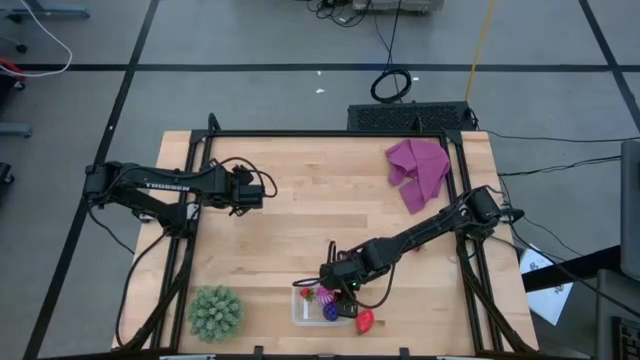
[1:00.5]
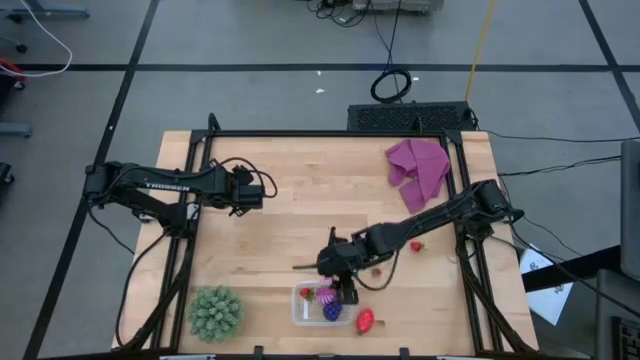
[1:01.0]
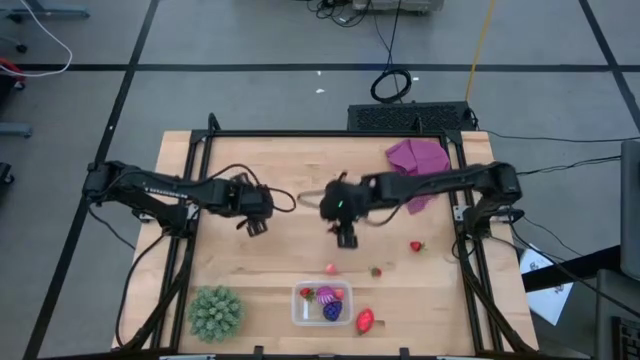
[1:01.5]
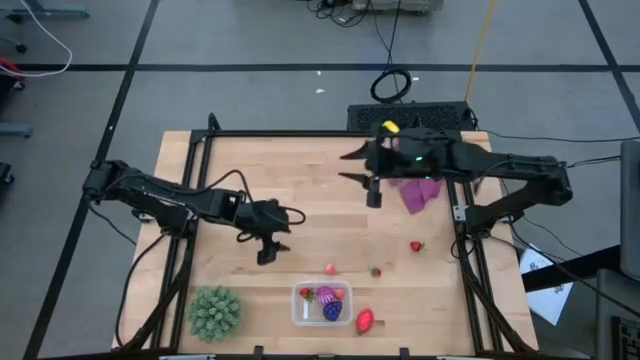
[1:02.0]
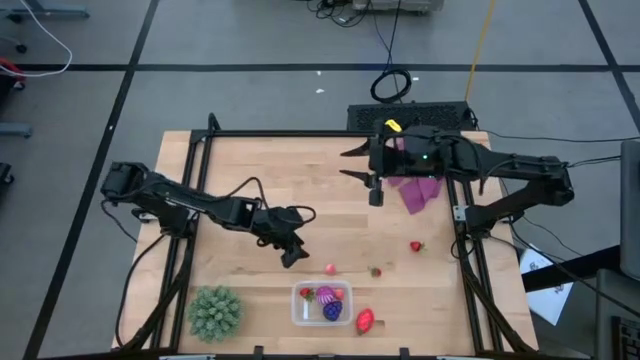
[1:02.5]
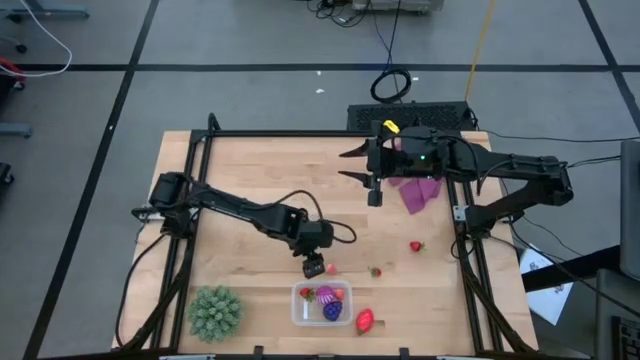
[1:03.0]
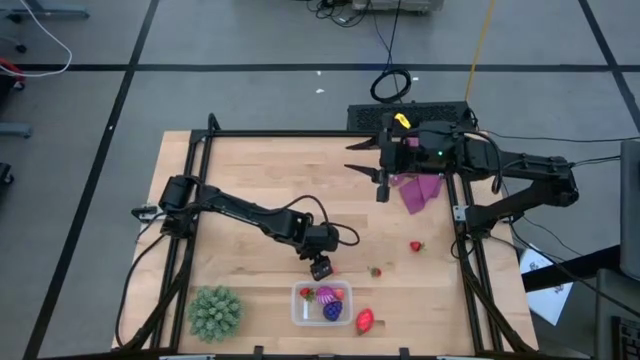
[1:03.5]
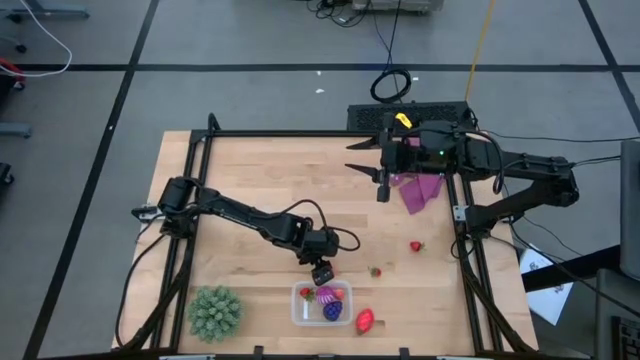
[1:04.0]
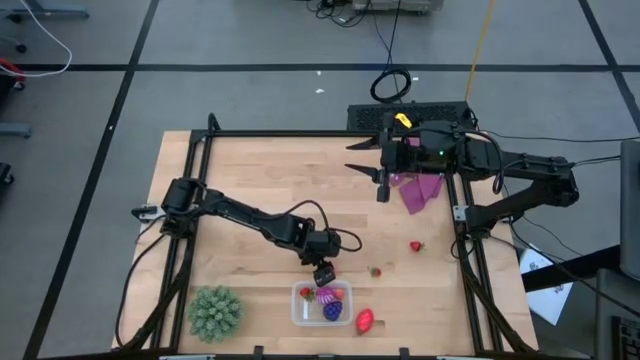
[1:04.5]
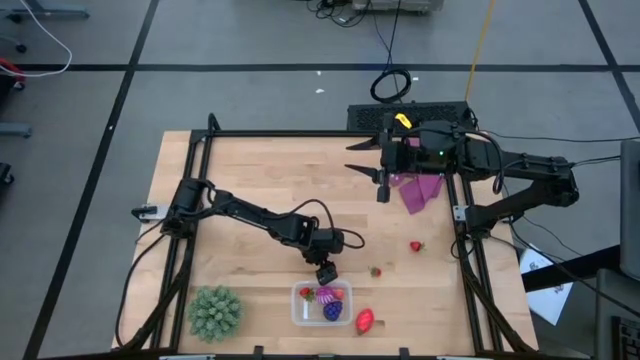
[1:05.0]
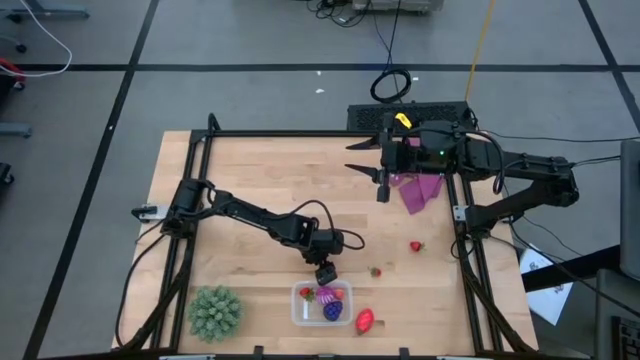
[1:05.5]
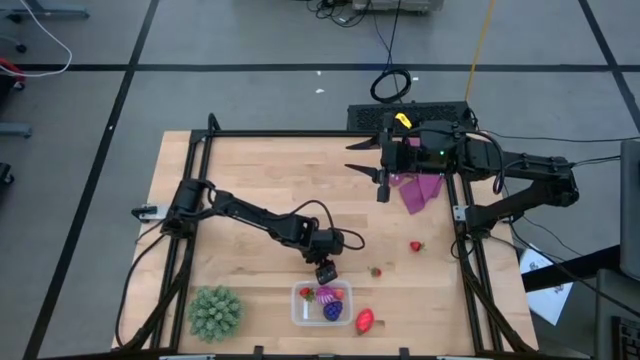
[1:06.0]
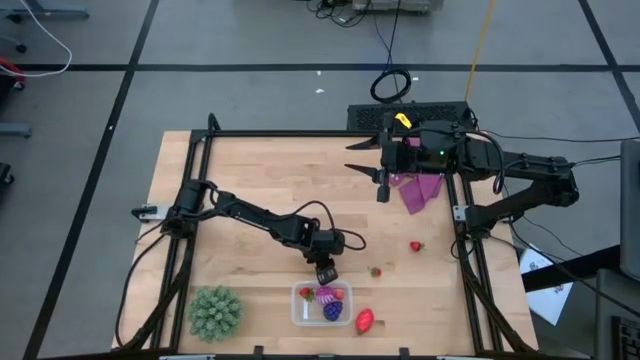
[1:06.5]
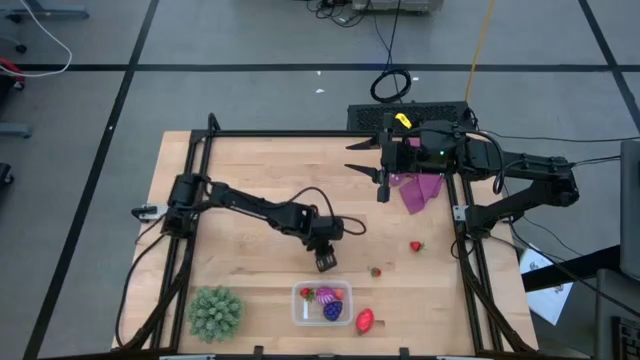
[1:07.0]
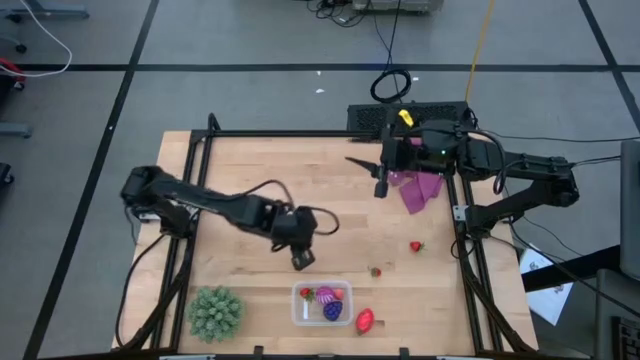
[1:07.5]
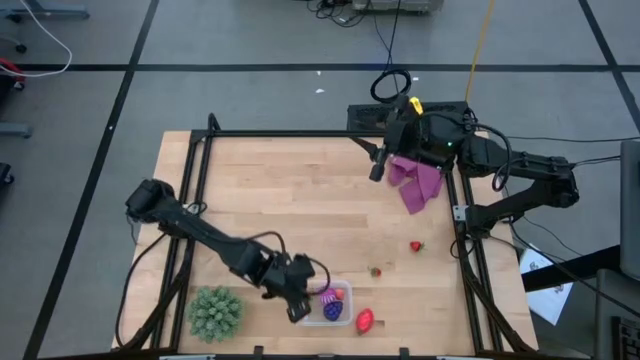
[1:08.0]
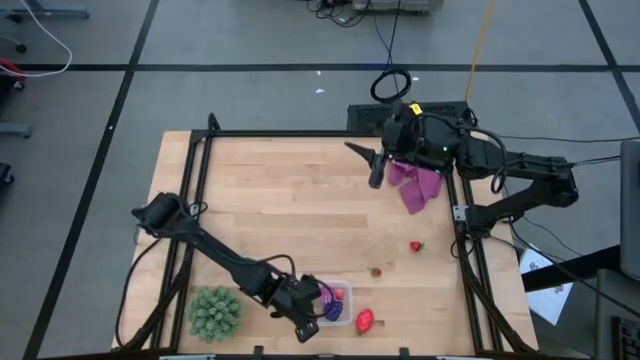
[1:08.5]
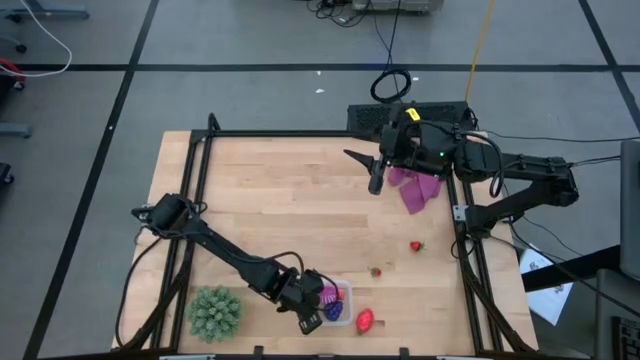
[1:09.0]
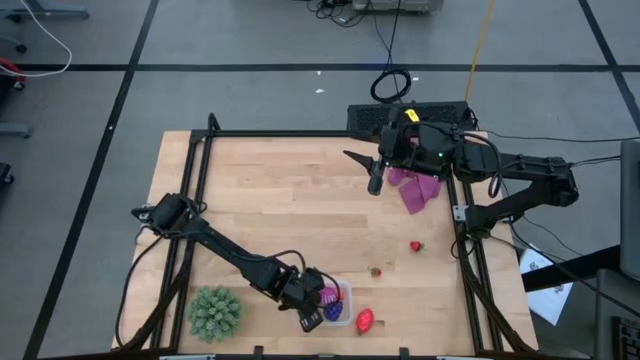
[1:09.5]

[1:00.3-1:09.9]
Task: Pick and placing Produce into tupperware
Put the peach into the transparent bin

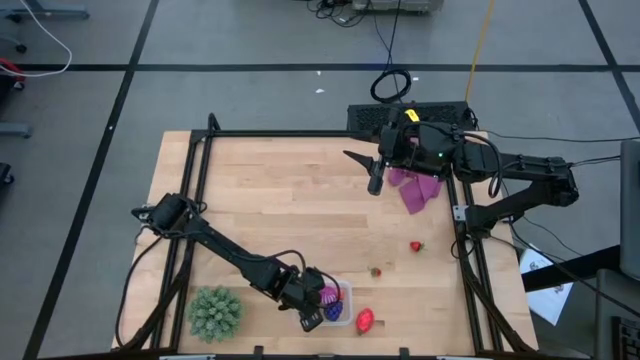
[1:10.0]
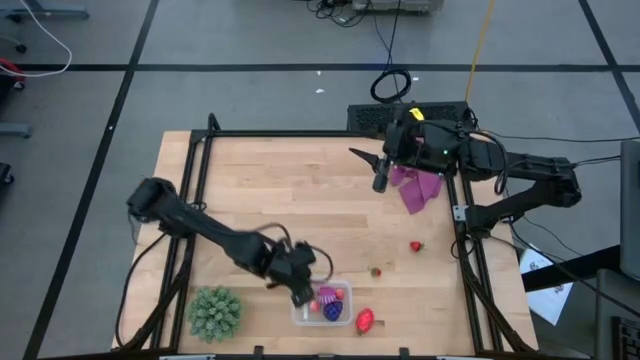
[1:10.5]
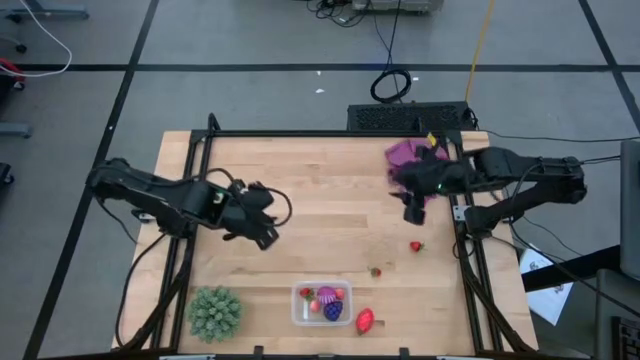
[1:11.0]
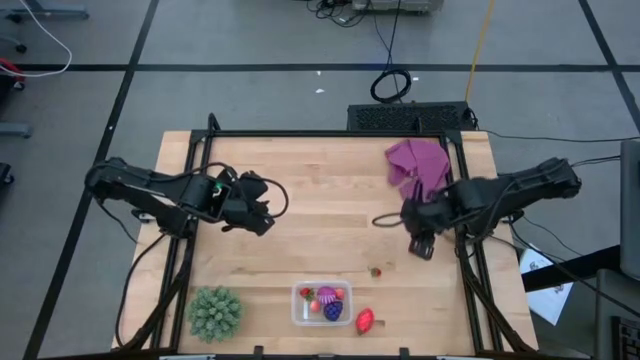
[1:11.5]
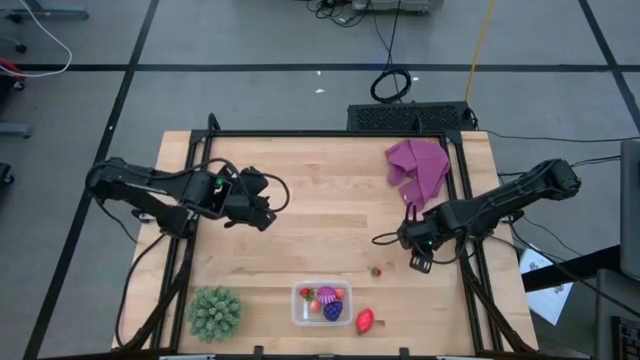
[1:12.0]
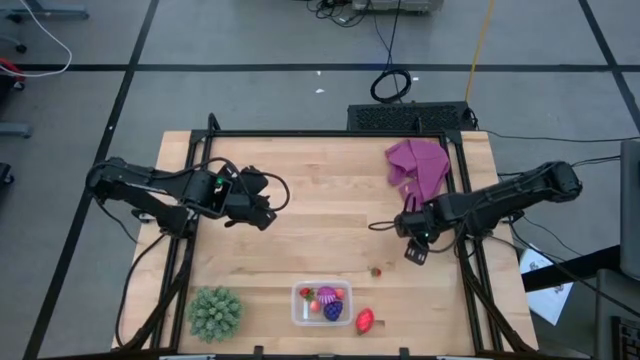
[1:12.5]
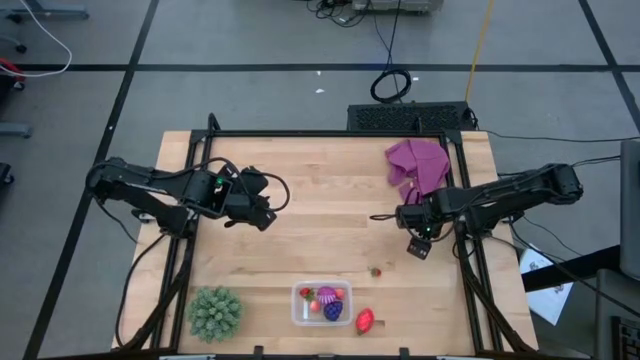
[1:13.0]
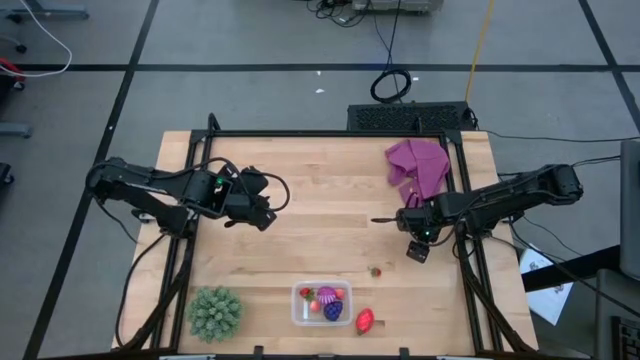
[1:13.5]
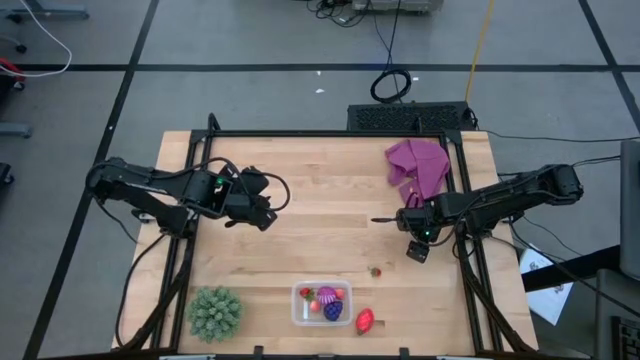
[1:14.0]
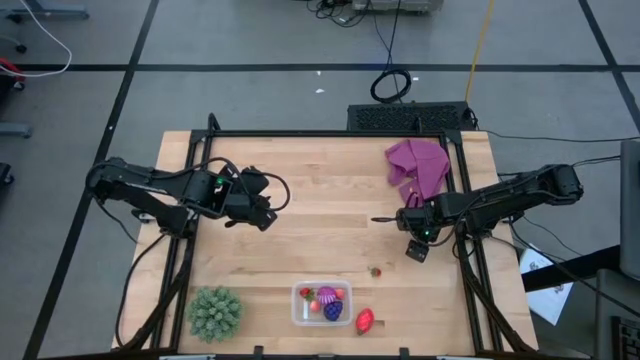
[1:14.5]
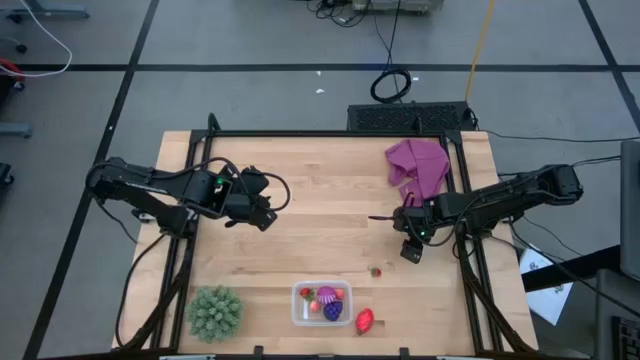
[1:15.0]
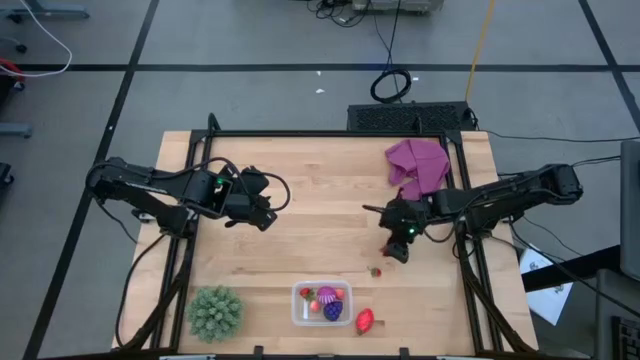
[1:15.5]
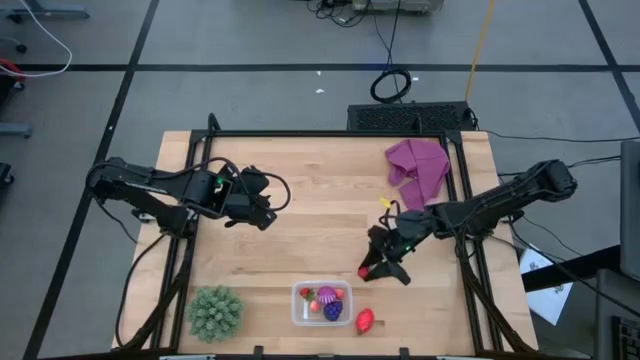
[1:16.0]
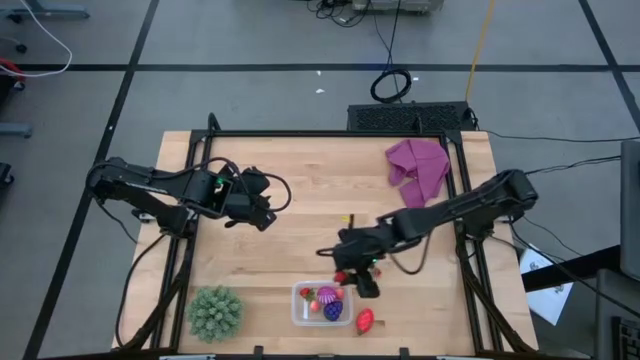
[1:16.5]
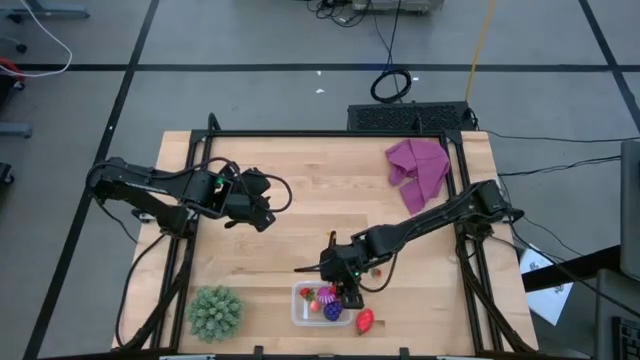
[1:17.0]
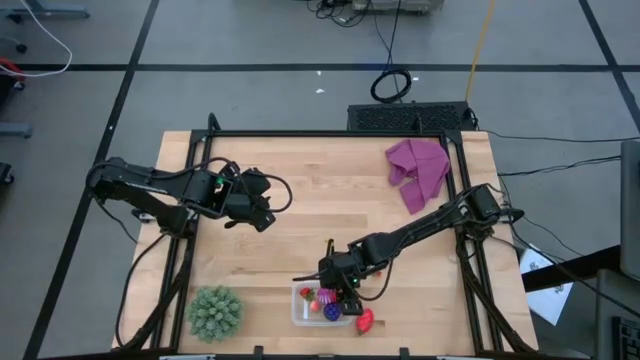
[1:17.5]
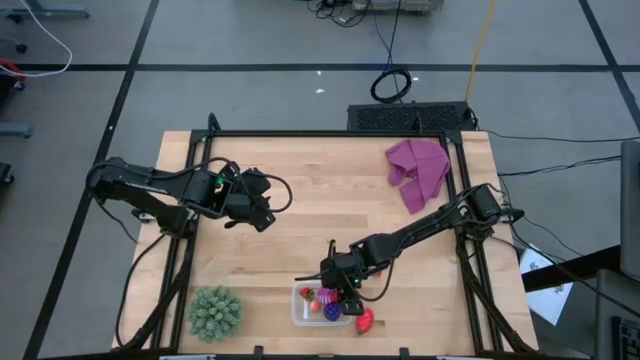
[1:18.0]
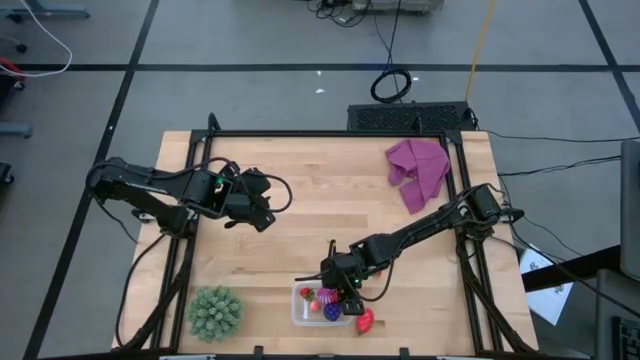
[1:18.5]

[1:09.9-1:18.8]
Put the right strawberry into the transparent bin

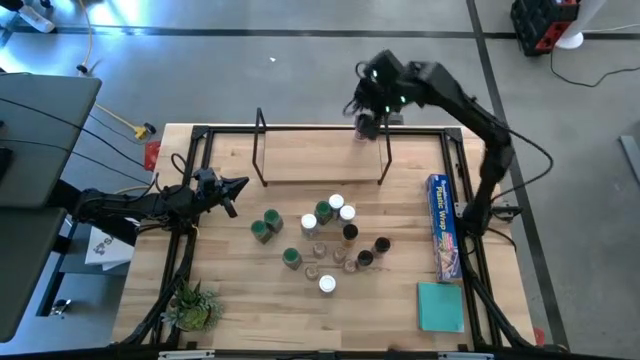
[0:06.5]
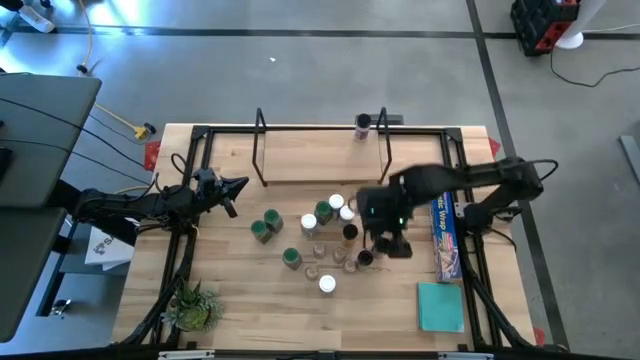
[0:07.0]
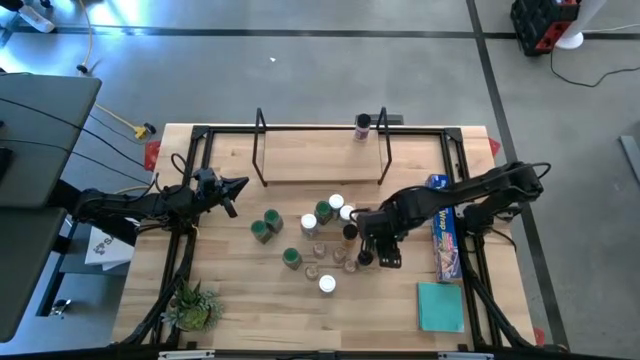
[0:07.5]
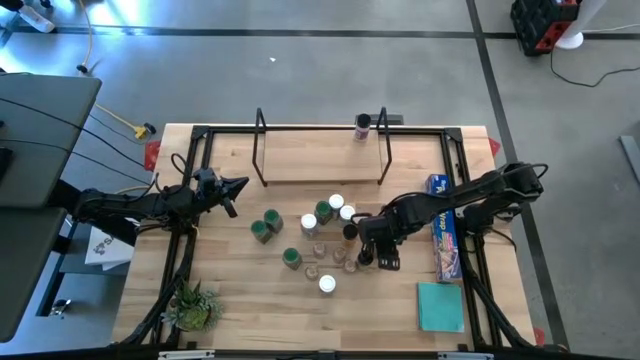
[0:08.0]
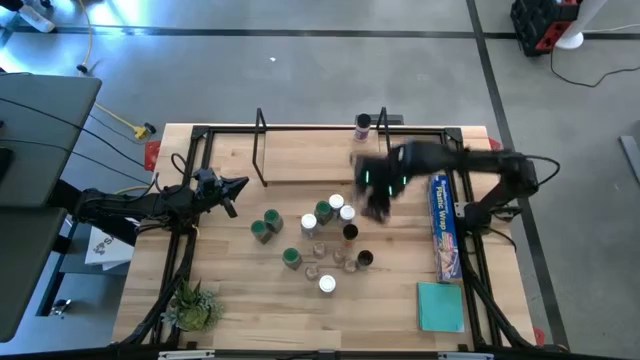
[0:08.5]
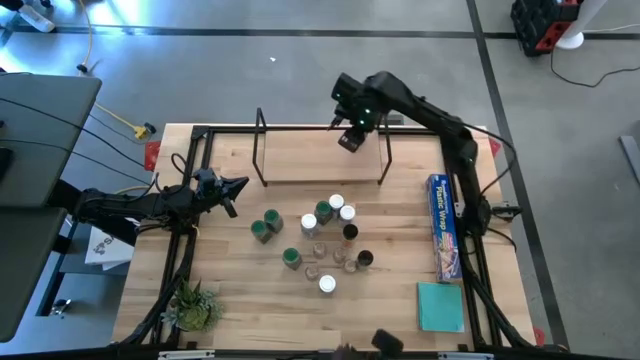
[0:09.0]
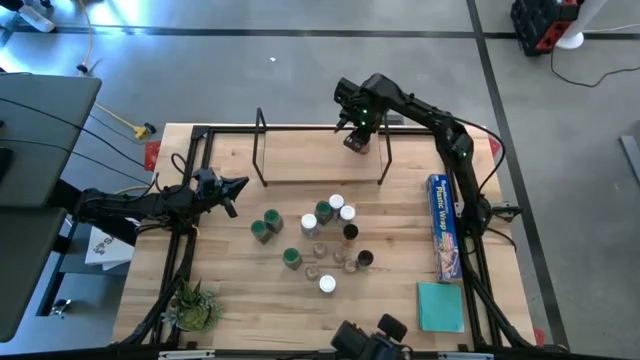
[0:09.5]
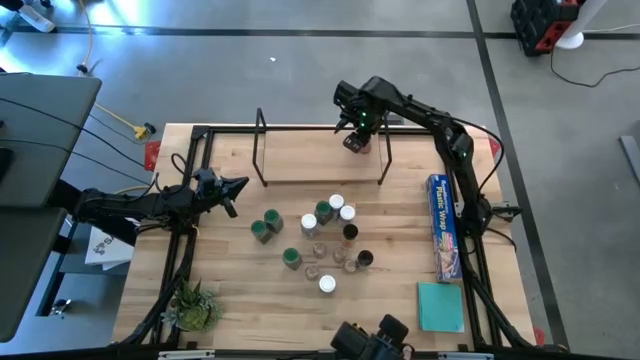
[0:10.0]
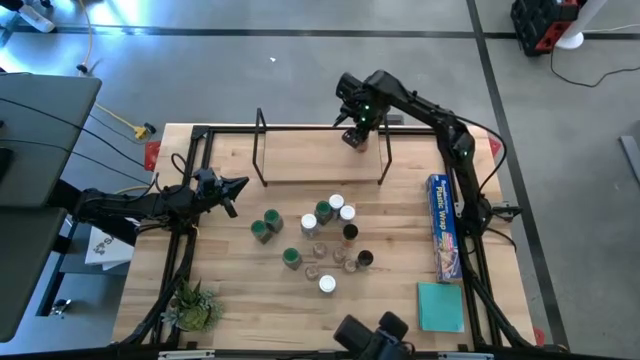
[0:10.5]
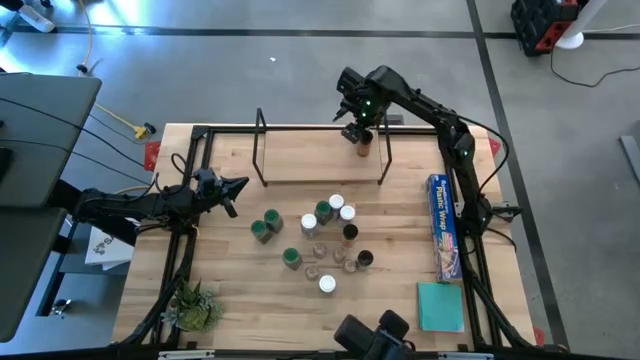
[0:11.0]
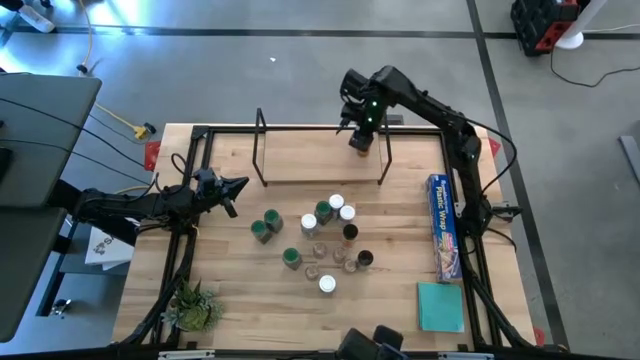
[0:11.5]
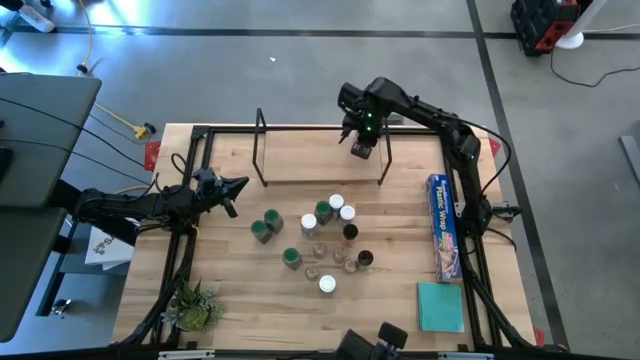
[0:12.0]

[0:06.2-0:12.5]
Task: Shelf spices
Put the dark orange seasoning bottle on the shelf
